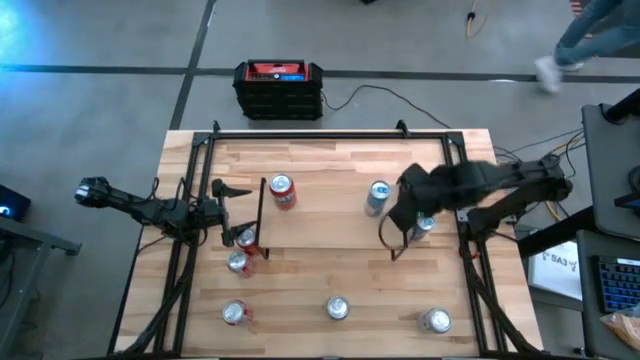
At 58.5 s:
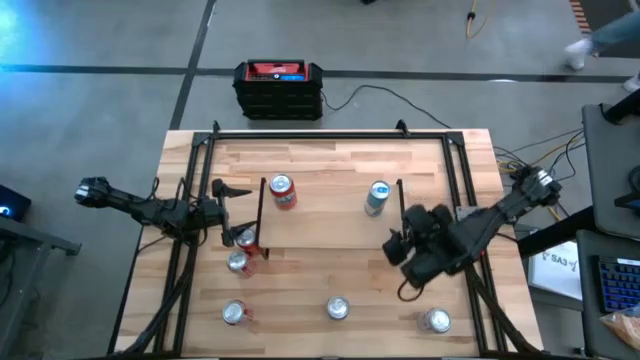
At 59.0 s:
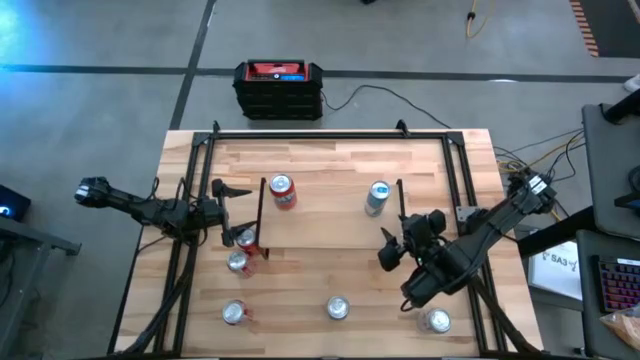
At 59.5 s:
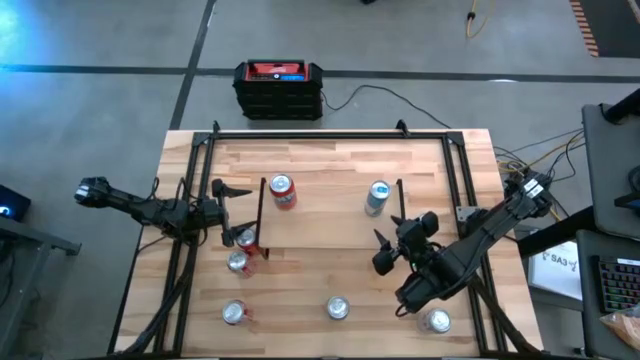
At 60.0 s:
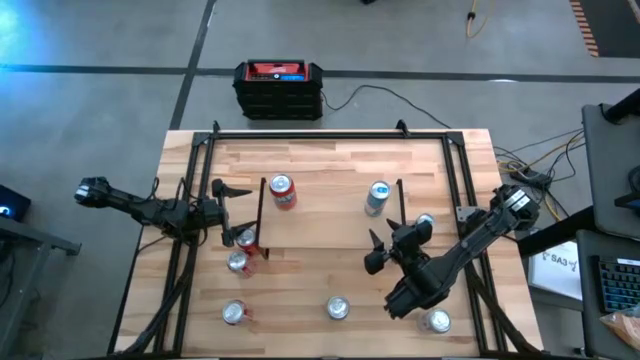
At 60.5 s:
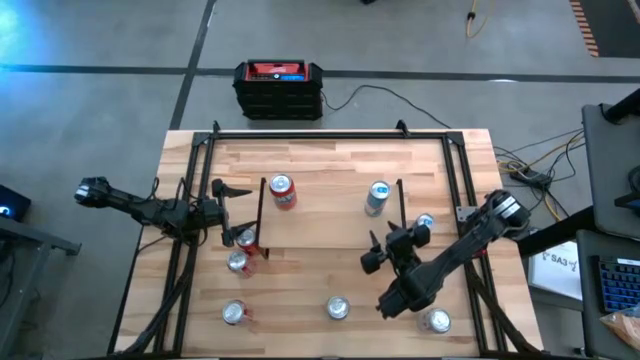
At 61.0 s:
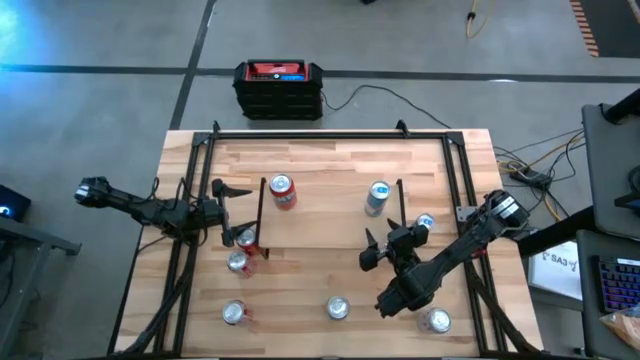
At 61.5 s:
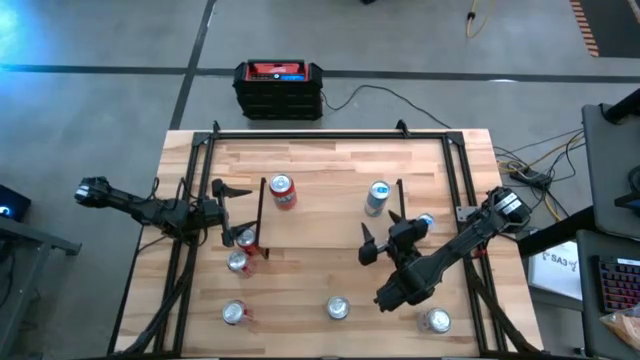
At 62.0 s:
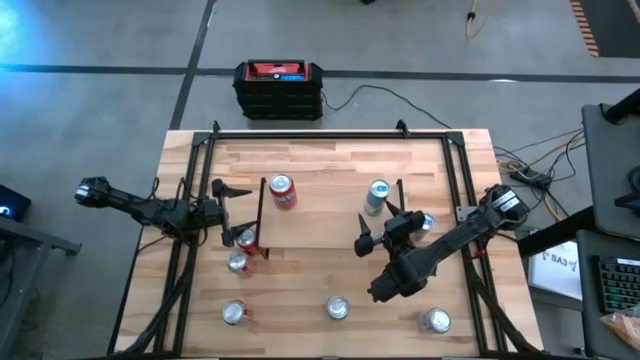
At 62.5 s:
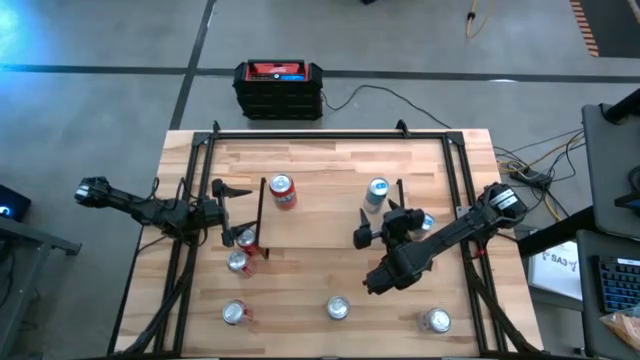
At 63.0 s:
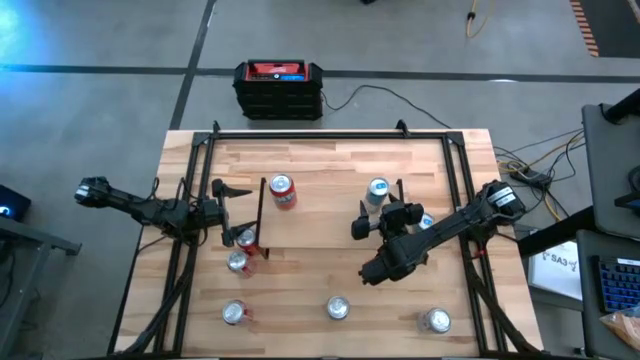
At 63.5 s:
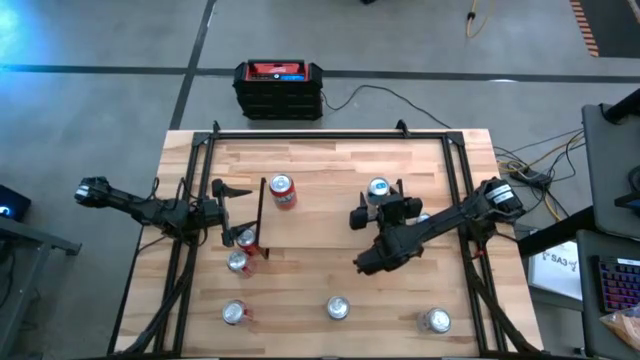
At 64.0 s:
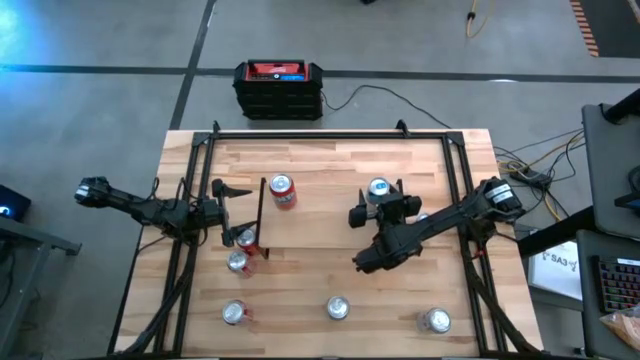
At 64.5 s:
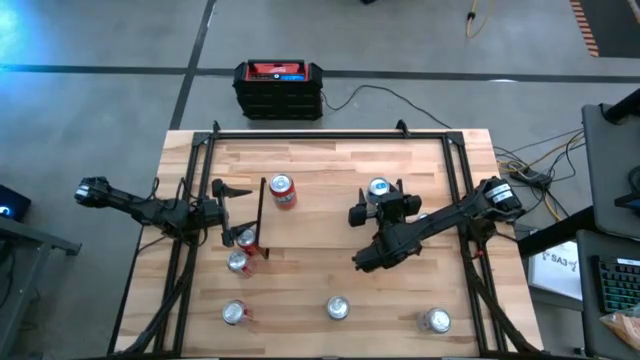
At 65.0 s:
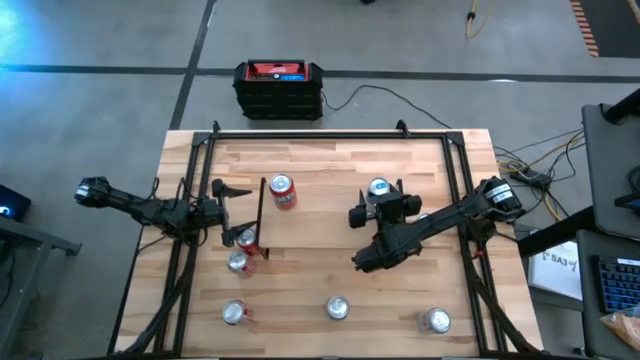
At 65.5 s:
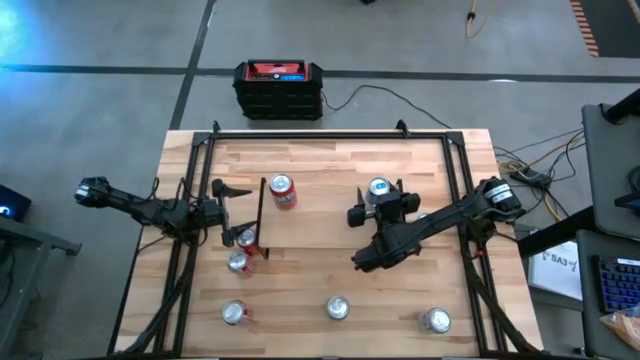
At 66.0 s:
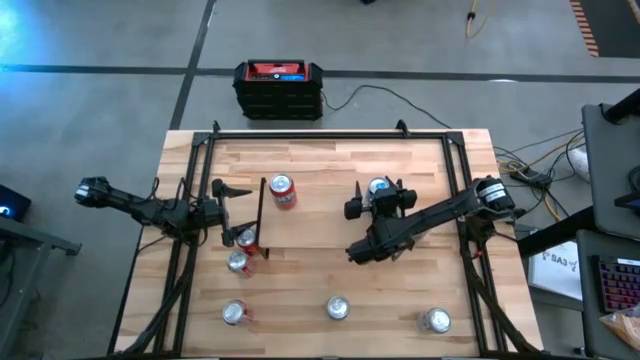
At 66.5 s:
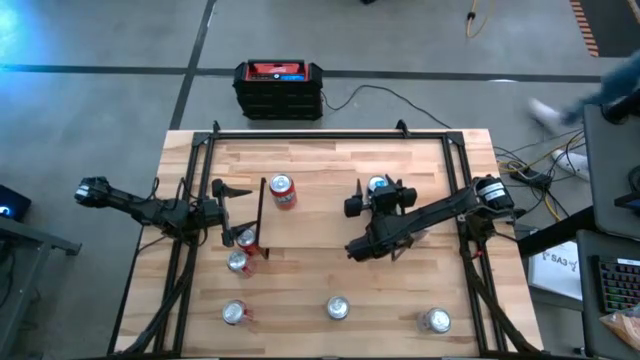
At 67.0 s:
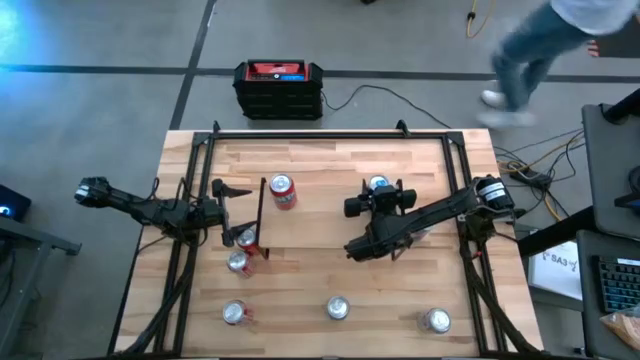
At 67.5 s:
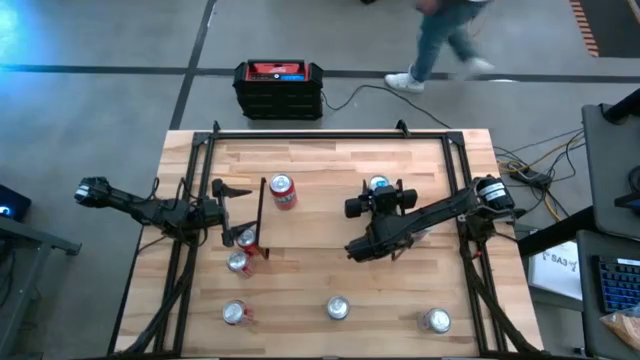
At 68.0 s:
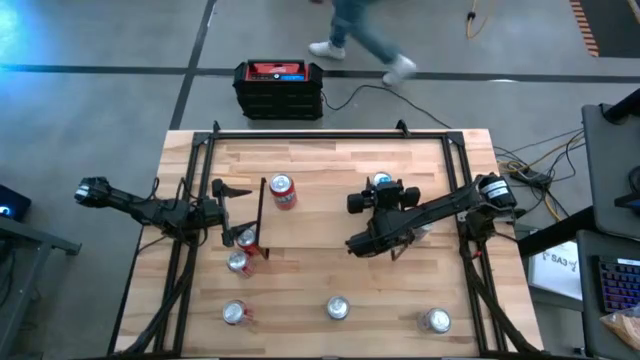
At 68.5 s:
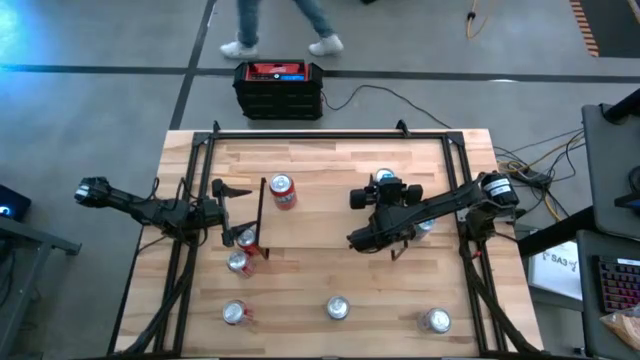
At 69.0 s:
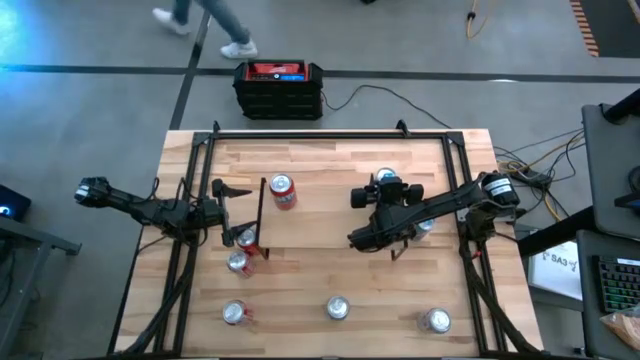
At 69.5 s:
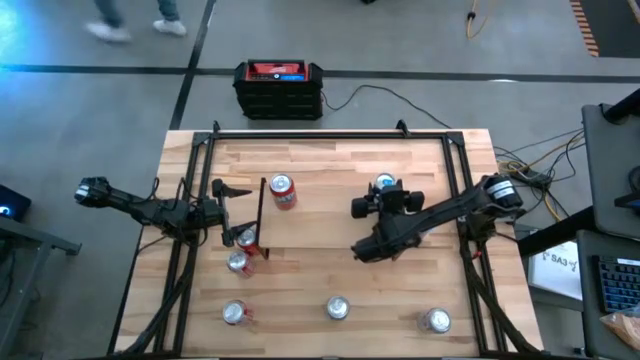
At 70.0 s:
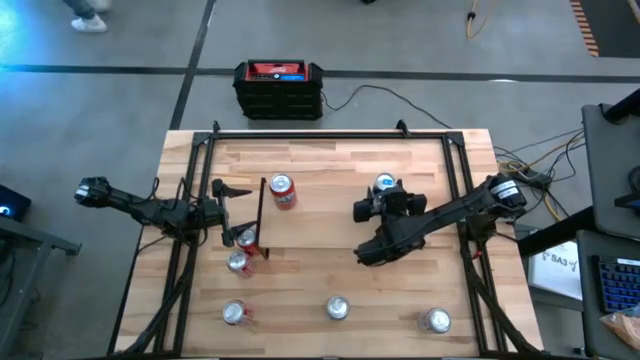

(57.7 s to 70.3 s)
Task: Place canned beverage on shelf
Put the top blue soda can on the shelf

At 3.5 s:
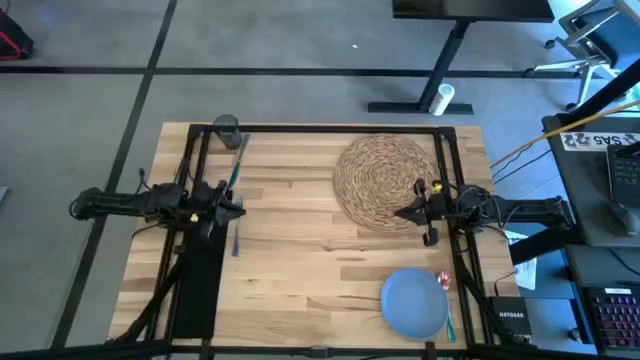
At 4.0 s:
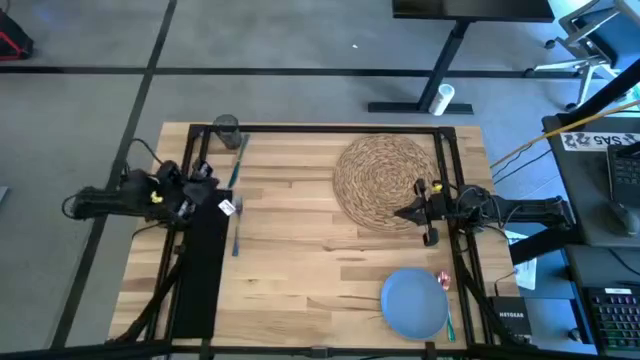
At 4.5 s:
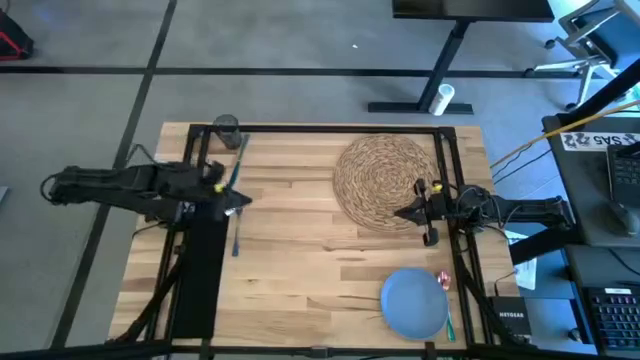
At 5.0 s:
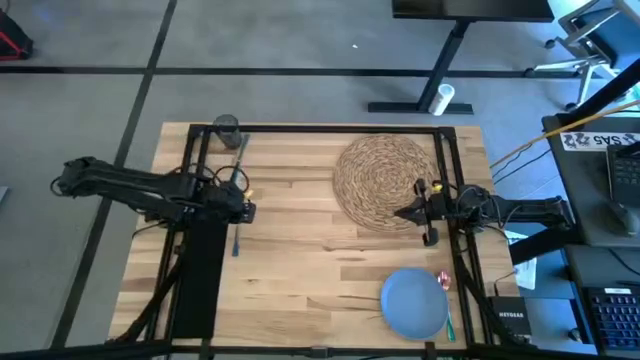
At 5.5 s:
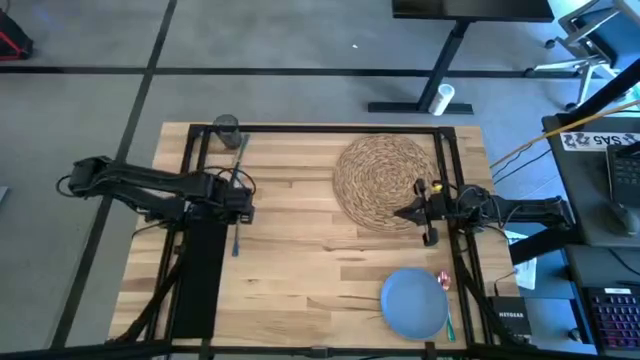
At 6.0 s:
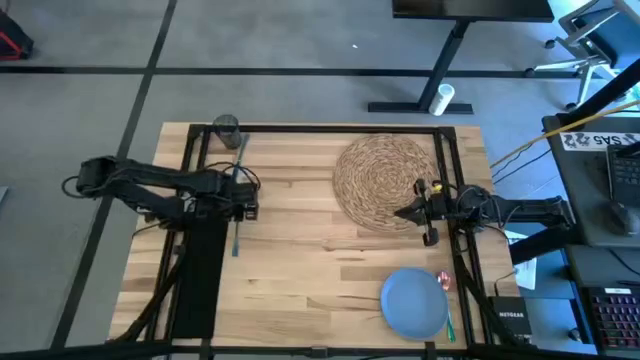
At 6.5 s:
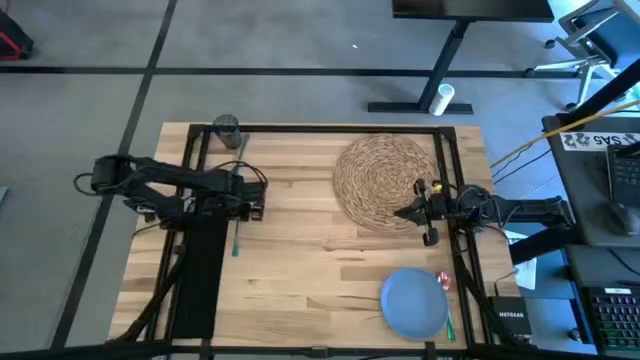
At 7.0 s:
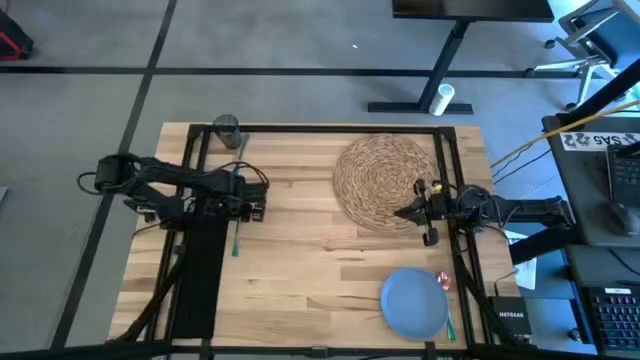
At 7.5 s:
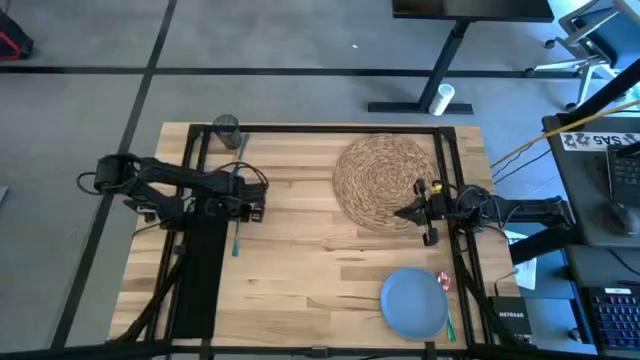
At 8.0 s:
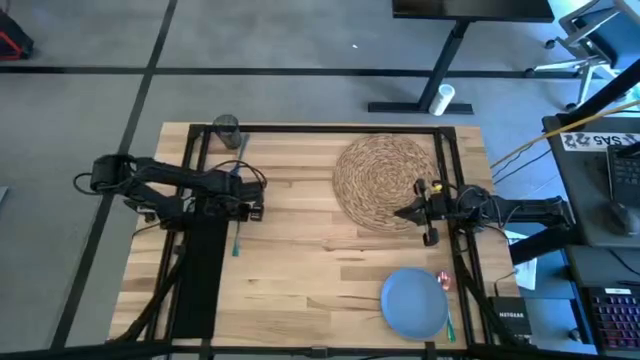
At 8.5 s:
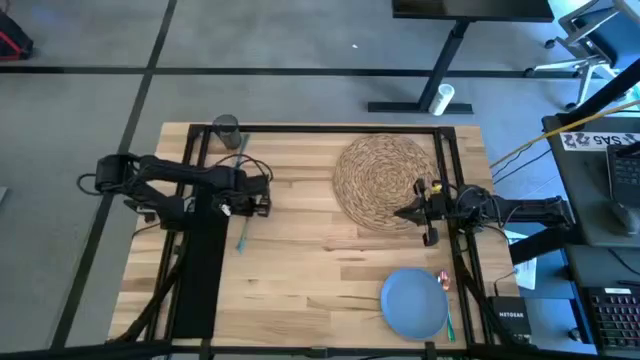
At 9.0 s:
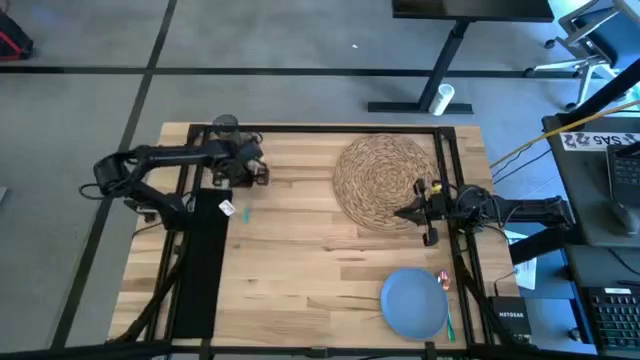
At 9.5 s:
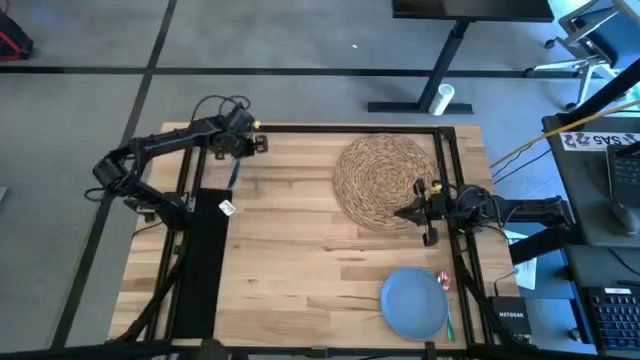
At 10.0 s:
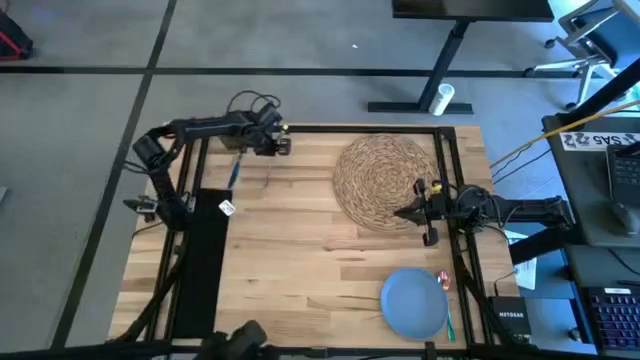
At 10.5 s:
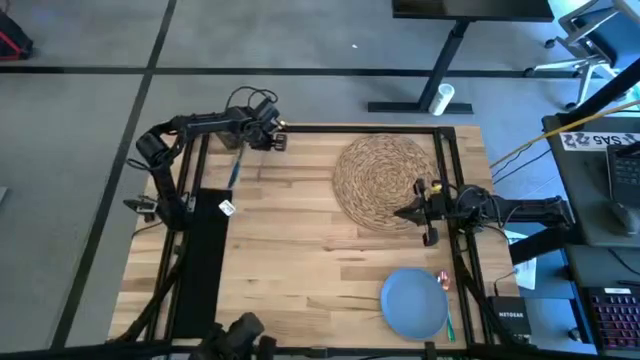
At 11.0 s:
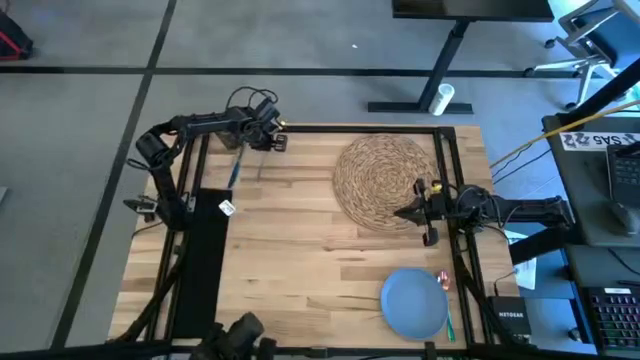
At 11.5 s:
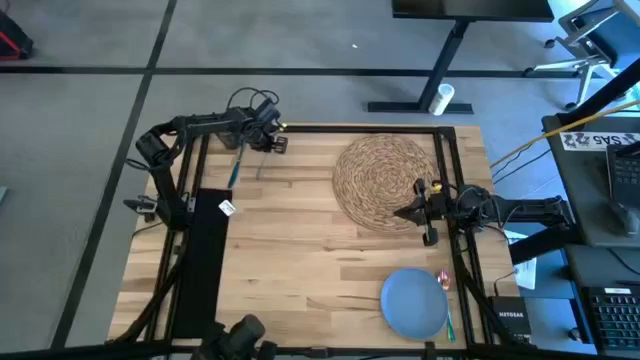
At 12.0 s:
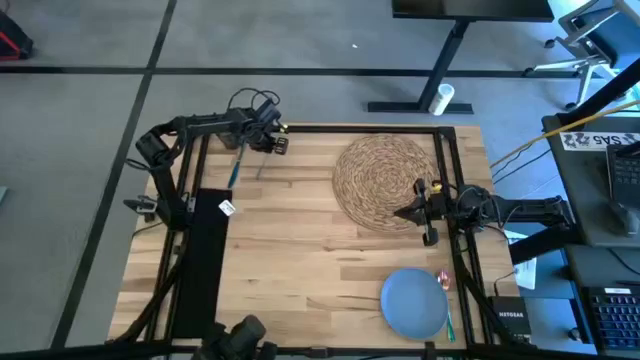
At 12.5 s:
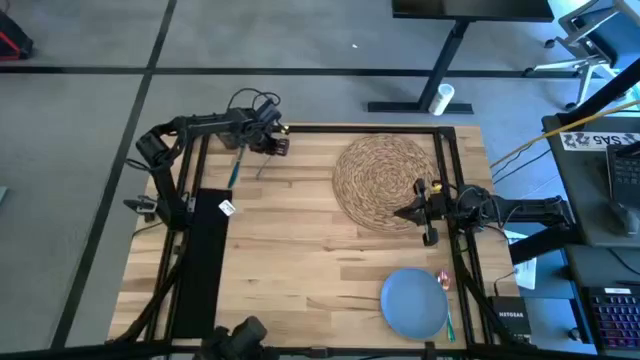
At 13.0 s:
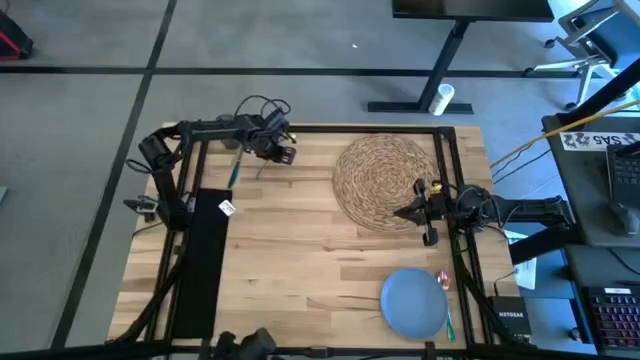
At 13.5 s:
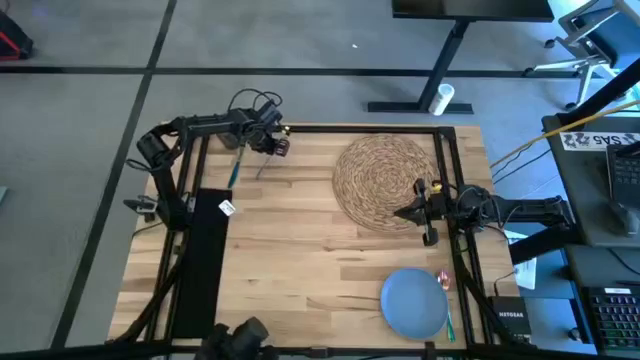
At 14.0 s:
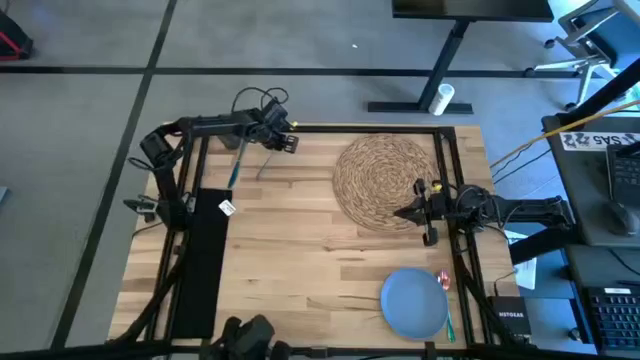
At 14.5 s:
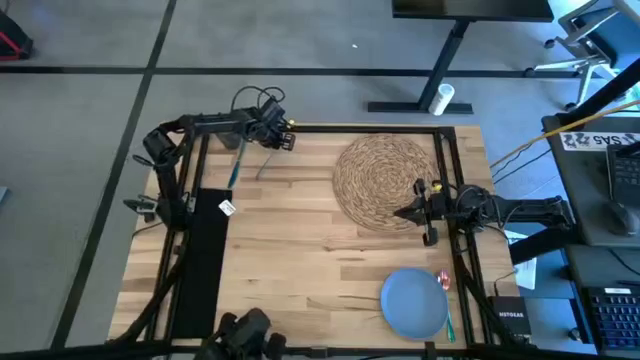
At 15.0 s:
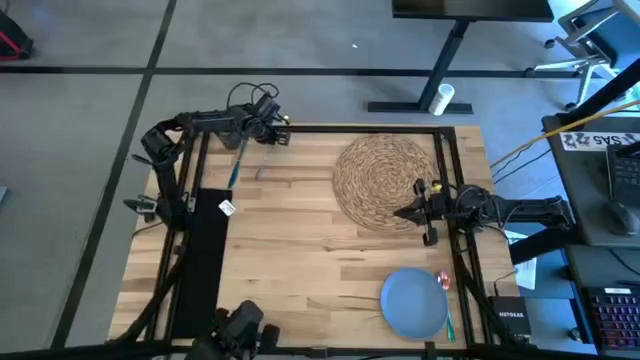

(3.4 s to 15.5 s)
Task: Set table place
Move the blue fork to the top left of the table
